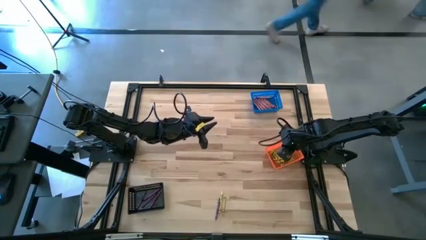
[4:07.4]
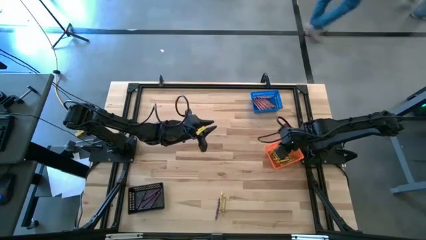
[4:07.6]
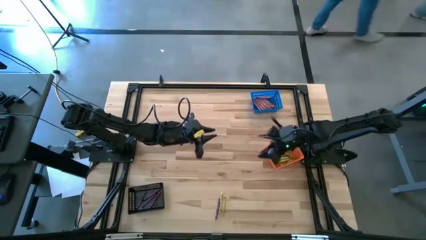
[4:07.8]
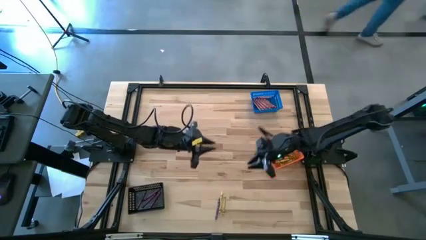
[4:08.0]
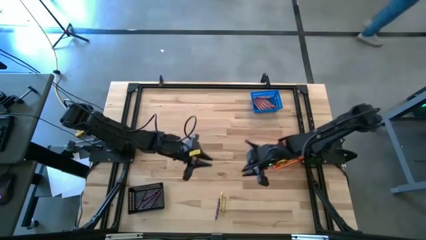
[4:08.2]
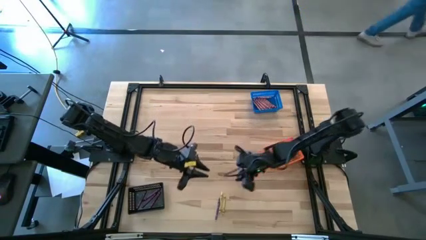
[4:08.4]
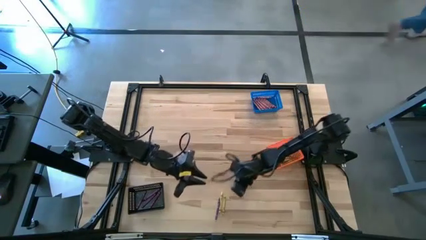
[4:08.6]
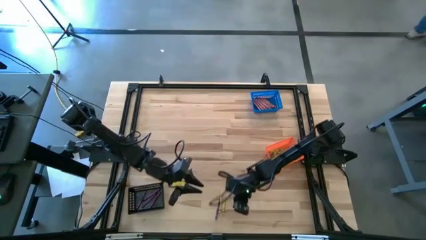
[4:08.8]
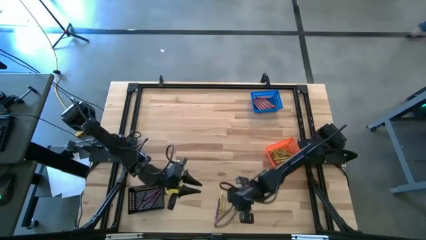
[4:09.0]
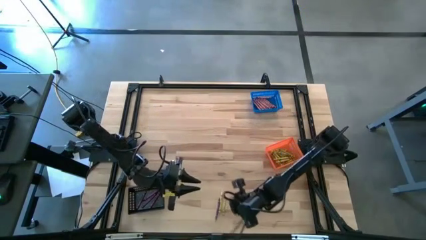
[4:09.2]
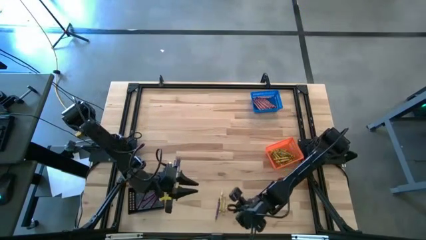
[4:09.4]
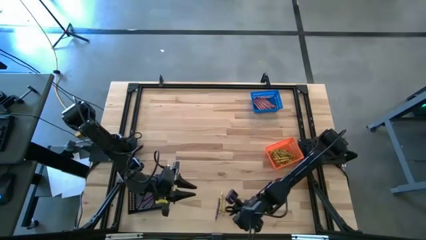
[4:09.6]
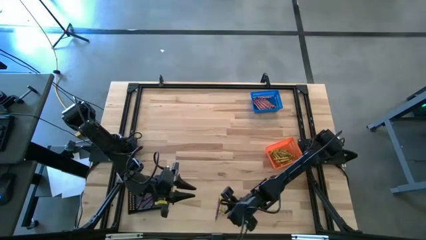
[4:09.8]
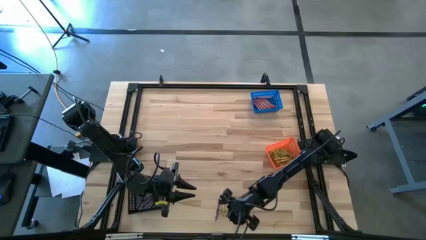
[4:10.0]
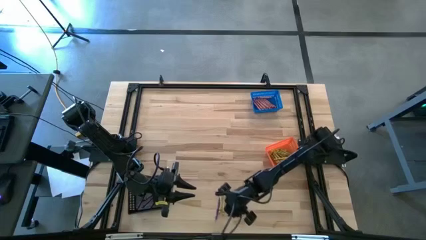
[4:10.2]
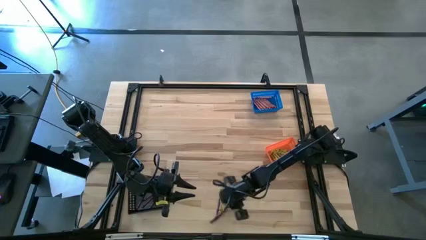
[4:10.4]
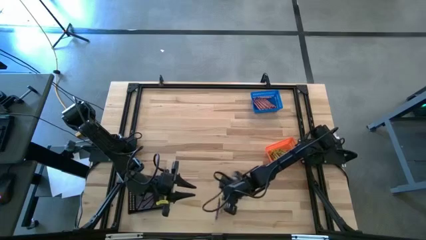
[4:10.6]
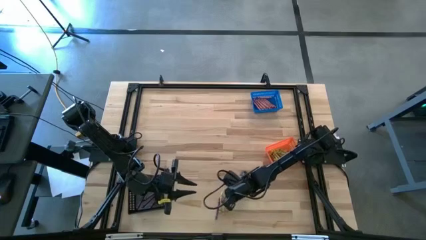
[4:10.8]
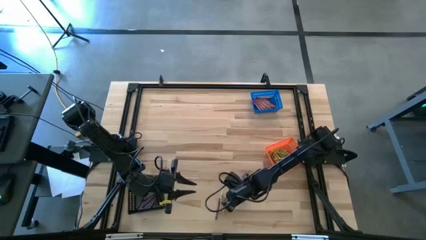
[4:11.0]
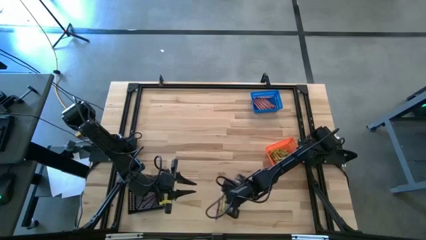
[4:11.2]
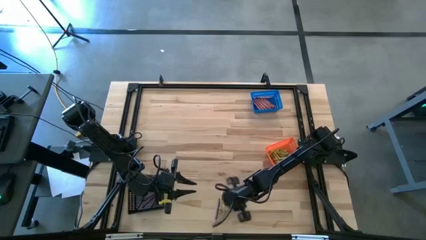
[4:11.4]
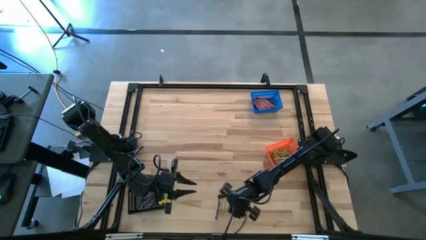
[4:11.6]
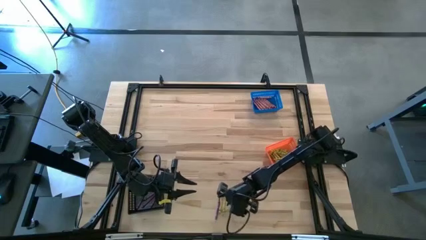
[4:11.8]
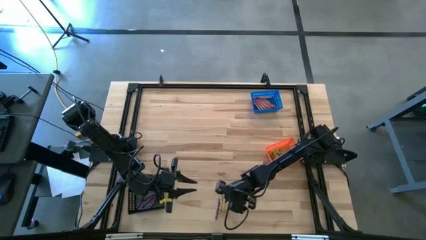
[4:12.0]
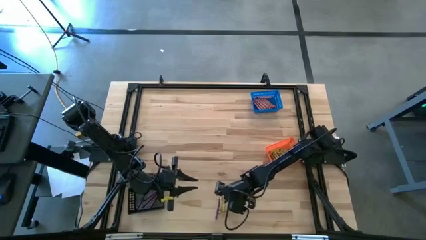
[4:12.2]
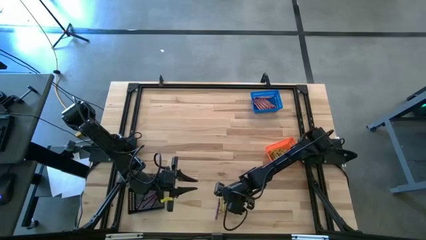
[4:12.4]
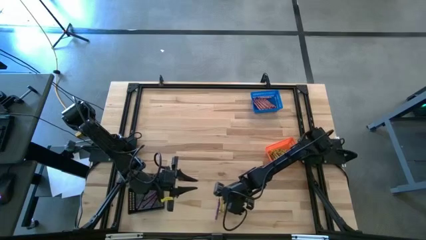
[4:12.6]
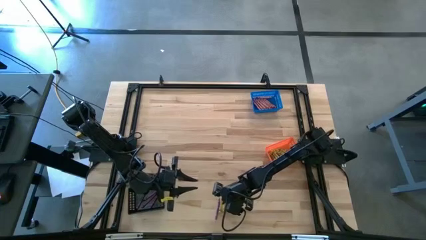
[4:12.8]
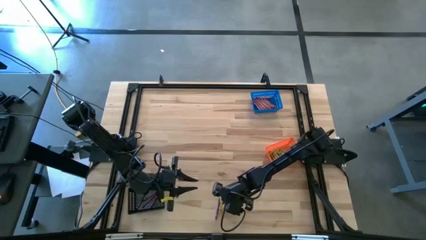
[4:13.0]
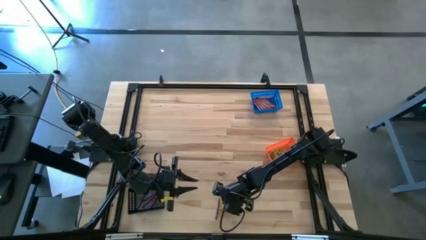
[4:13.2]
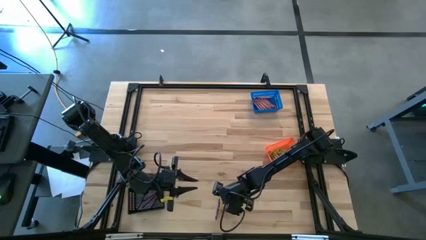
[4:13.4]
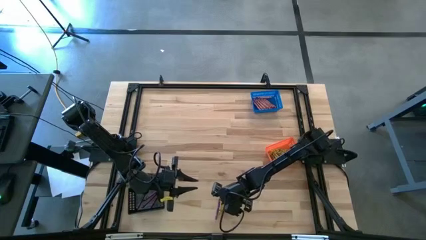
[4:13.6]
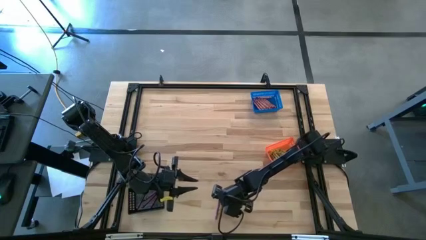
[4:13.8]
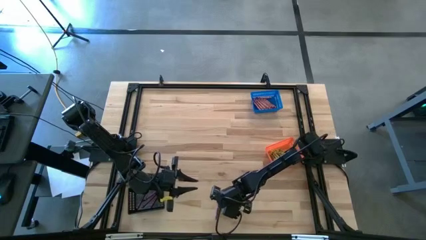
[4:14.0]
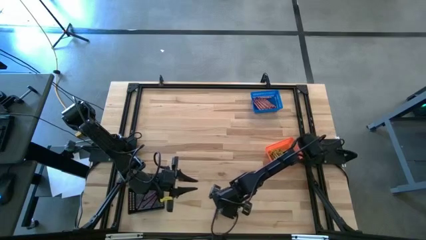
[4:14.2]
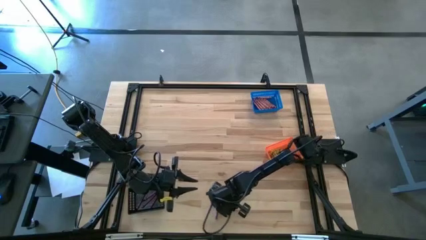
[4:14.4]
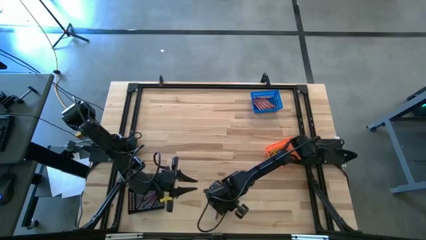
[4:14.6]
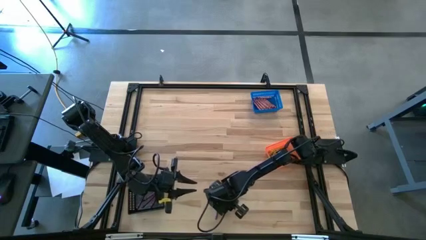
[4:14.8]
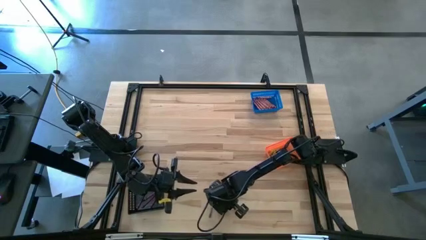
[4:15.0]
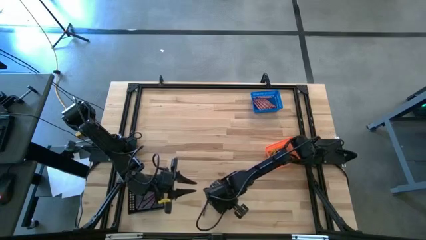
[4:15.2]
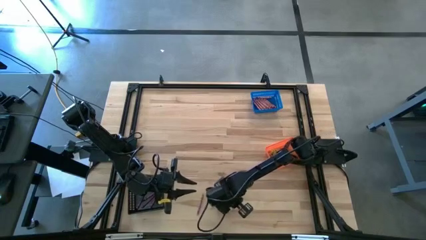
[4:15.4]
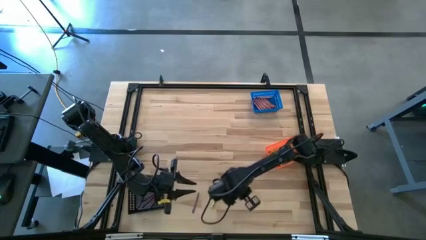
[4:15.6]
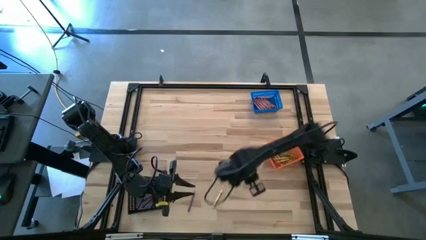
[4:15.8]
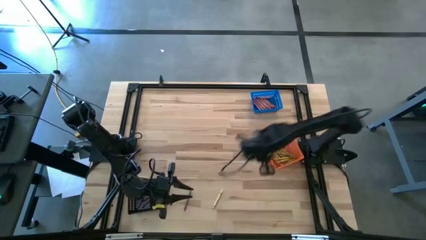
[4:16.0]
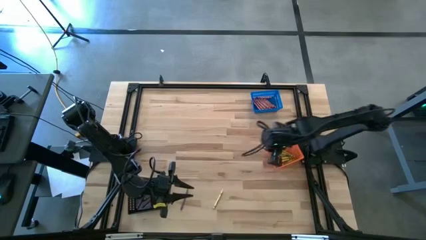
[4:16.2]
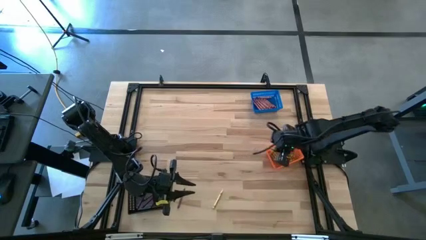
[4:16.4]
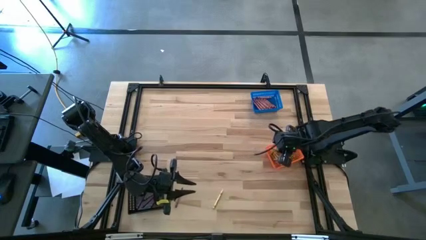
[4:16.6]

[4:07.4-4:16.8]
Task: Sort crayons
Put the yellow crayon into the orange basket

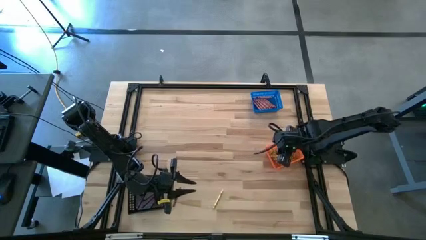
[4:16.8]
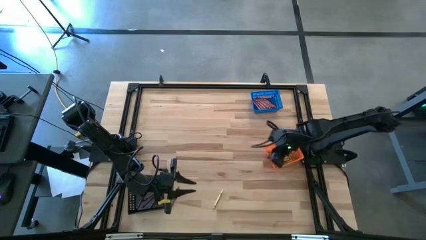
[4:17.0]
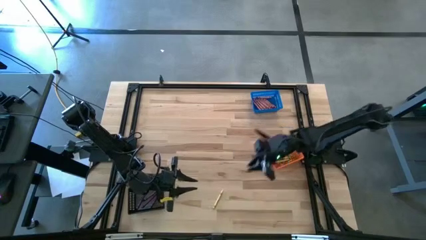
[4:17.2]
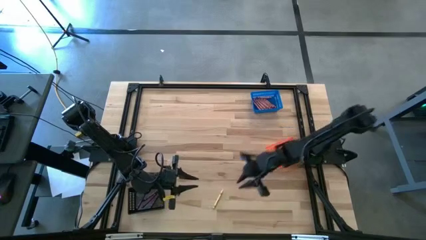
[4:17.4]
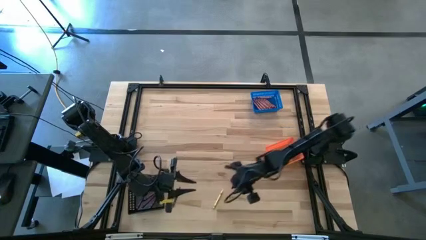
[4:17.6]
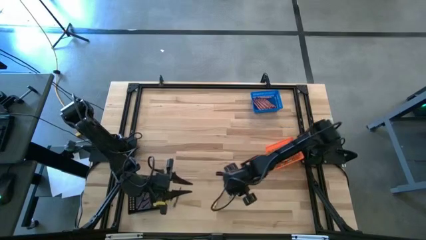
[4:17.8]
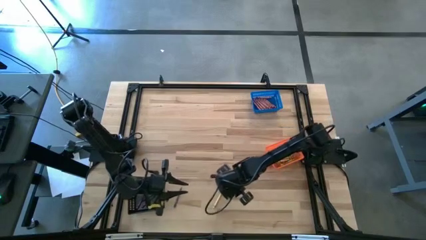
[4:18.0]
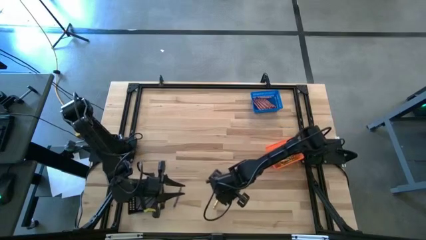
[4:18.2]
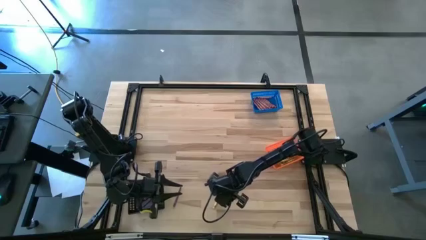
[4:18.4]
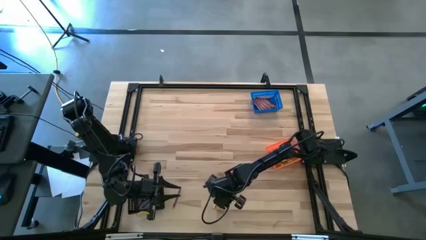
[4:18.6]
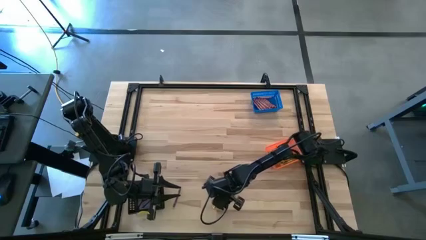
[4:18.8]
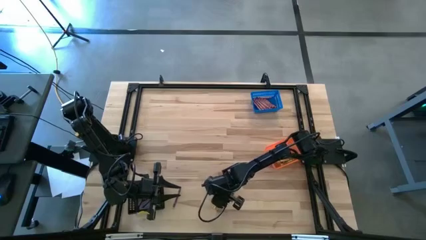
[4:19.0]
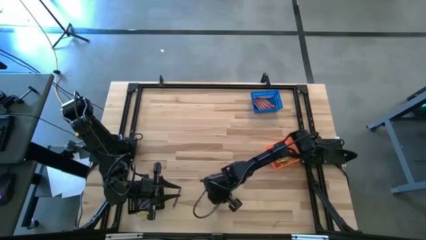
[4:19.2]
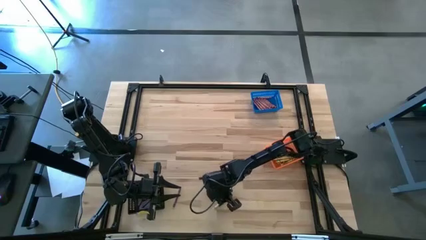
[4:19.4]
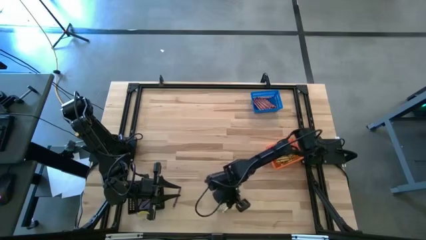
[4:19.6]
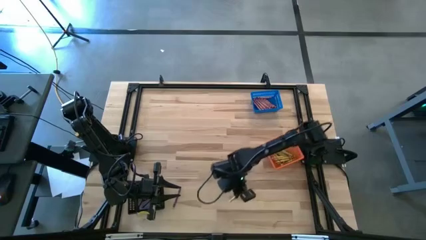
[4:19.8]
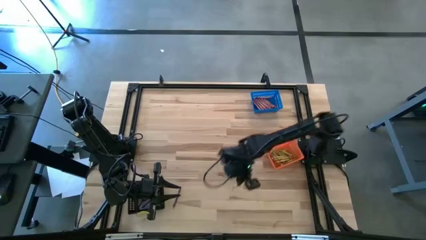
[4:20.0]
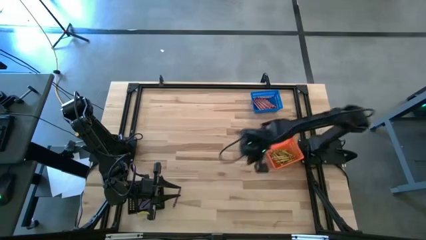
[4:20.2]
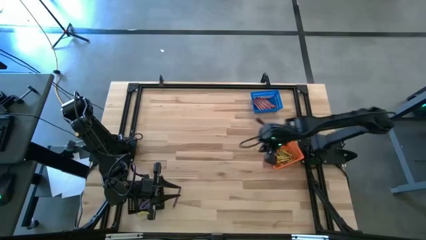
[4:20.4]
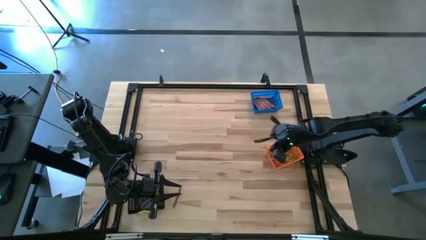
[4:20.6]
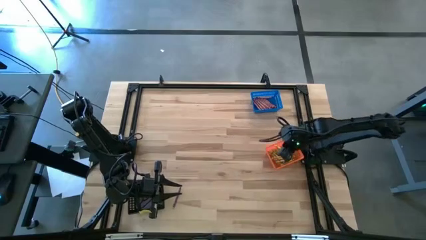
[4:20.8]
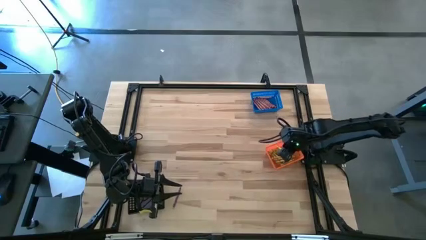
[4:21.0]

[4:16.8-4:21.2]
Put the yellow crayon into the orange basket

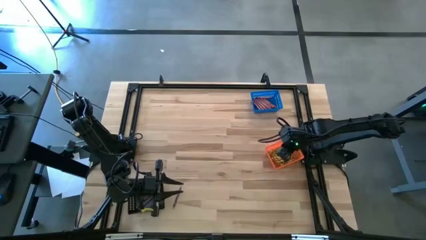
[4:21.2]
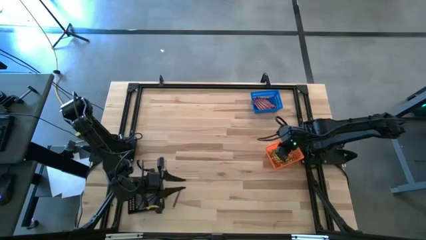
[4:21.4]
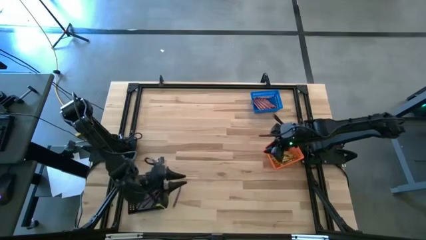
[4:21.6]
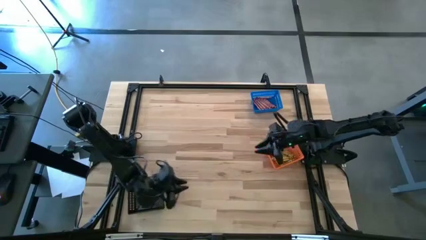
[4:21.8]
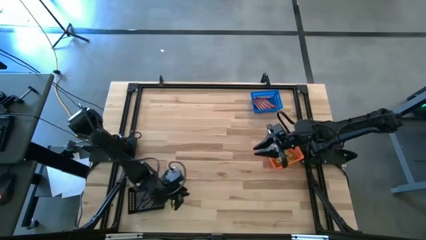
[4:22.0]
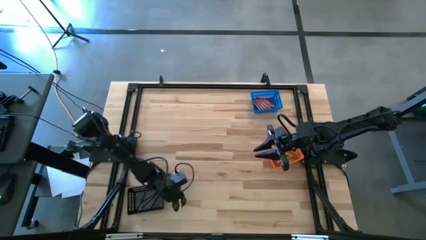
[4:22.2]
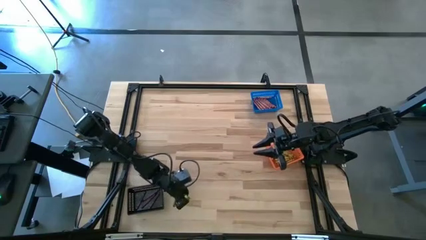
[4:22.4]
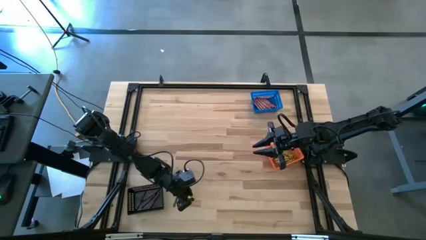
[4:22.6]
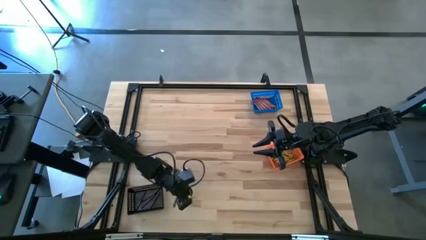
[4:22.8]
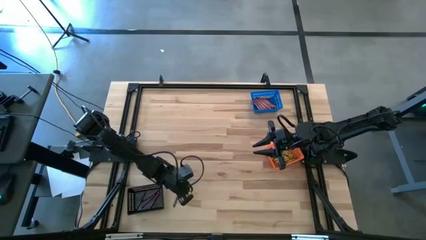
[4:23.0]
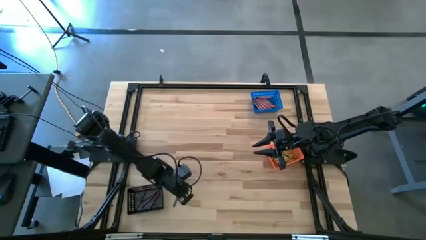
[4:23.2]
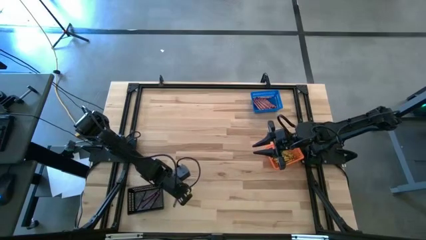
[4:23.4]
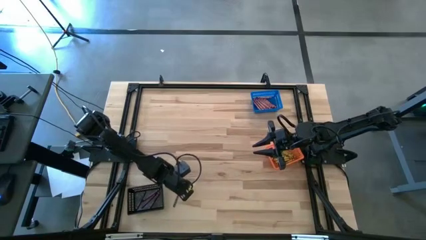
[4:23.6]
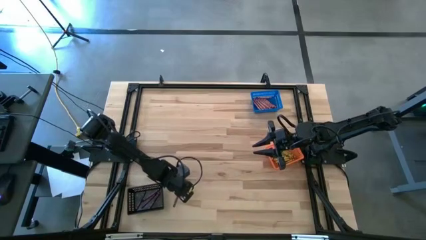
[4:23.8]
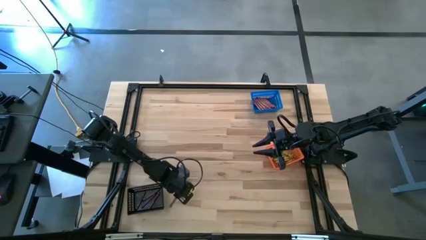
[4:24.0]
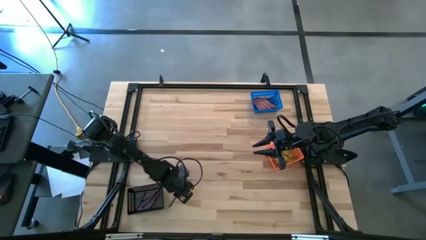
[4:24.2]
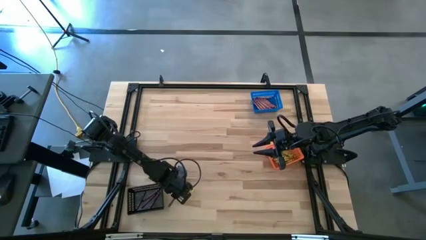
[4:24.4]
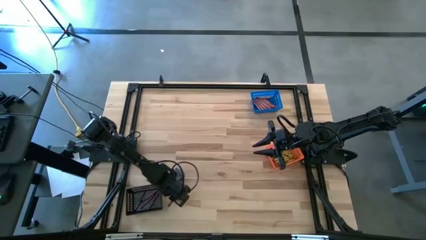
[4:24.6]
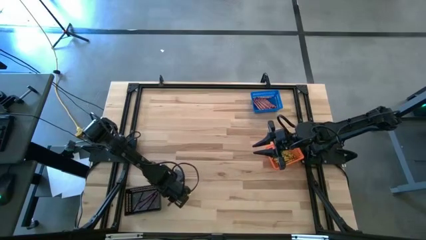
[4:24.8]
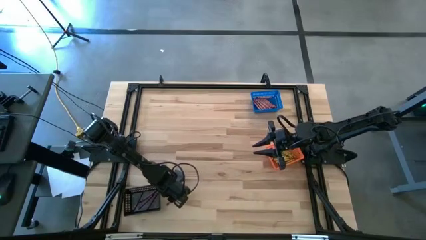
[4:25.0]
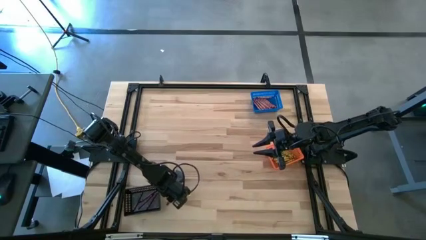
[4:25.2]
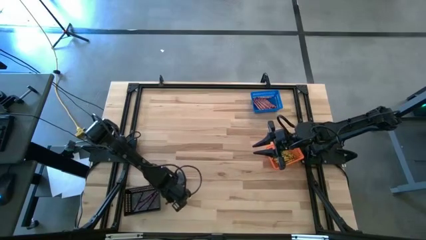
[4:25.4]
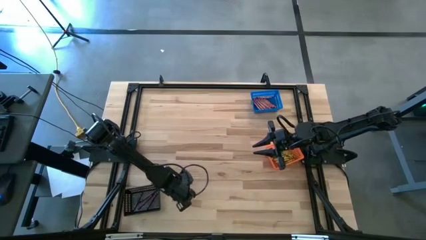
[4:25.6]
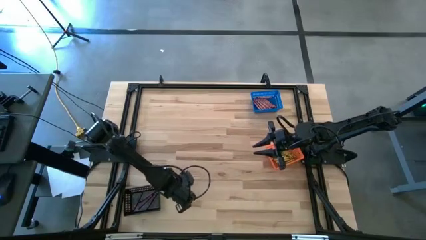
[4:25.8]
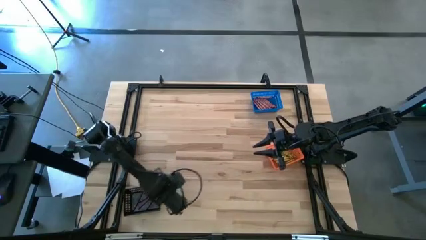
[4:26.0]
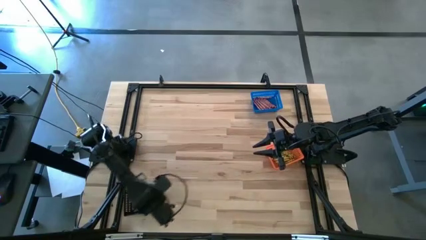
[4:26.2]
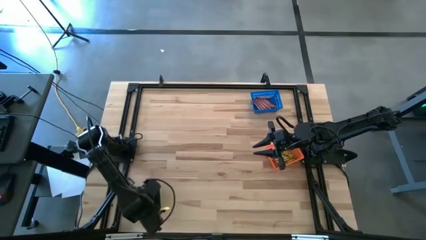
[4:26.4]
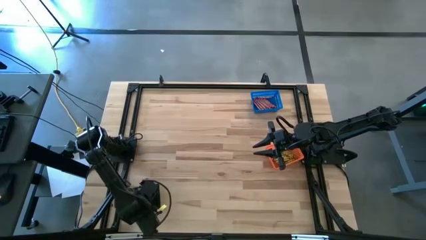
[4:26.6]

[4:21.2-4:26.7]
Put the violet crayon into the black basket
